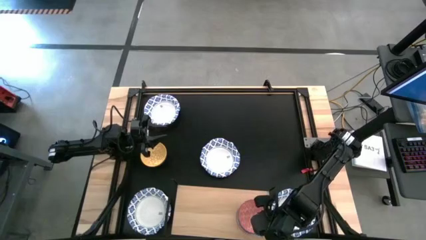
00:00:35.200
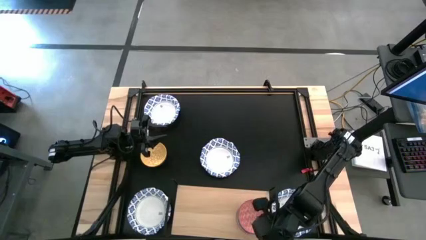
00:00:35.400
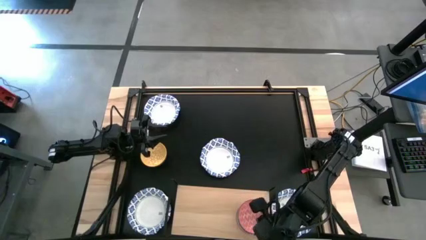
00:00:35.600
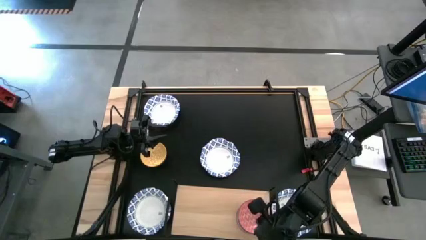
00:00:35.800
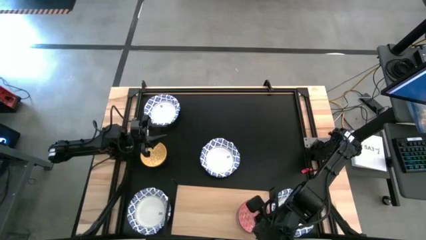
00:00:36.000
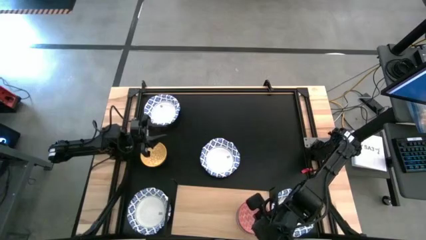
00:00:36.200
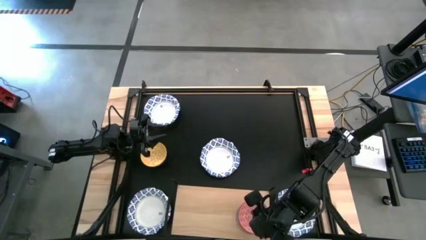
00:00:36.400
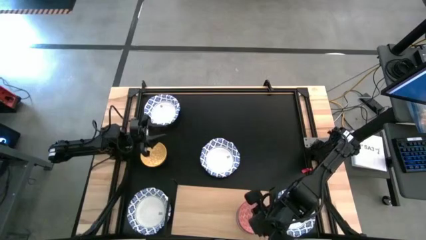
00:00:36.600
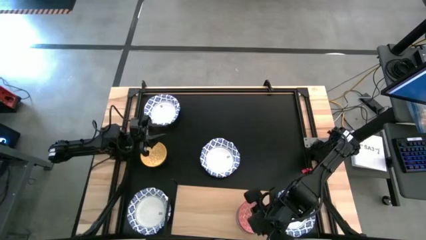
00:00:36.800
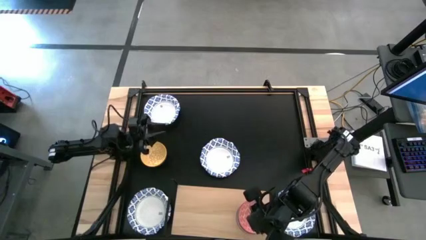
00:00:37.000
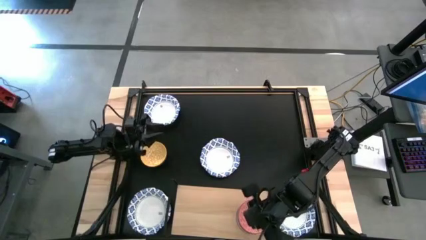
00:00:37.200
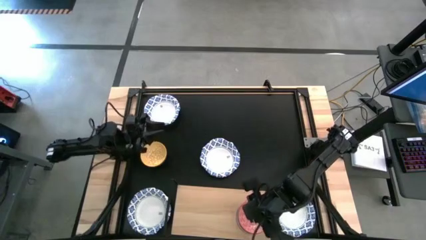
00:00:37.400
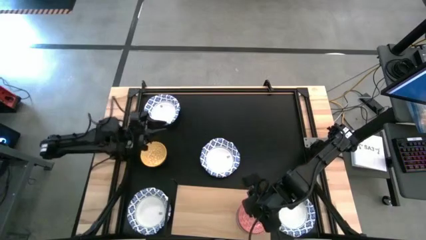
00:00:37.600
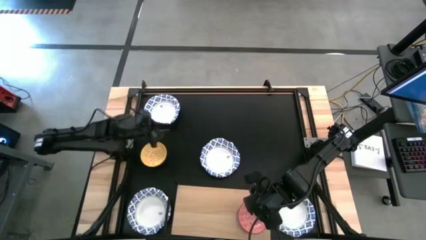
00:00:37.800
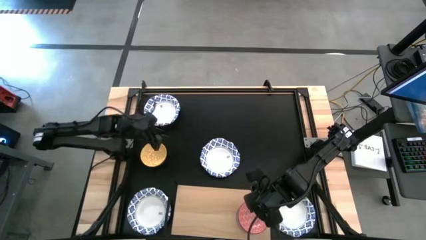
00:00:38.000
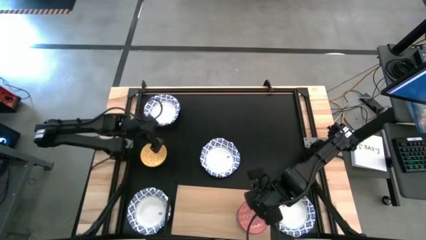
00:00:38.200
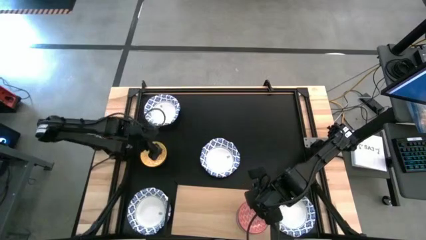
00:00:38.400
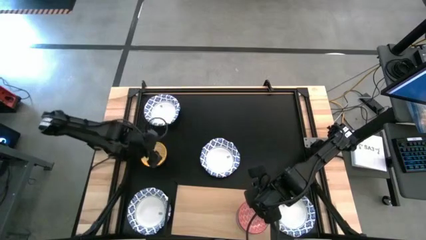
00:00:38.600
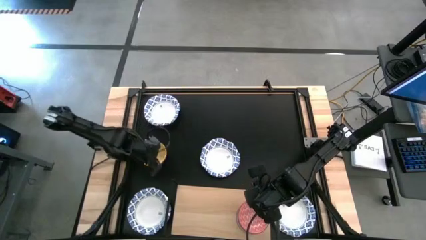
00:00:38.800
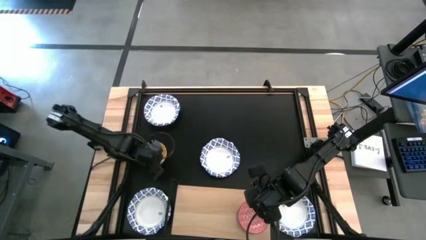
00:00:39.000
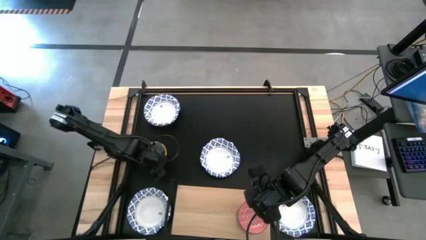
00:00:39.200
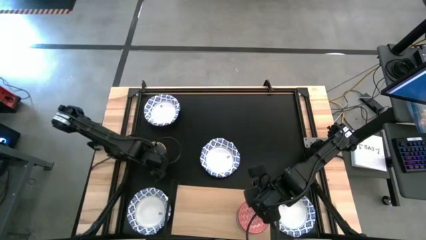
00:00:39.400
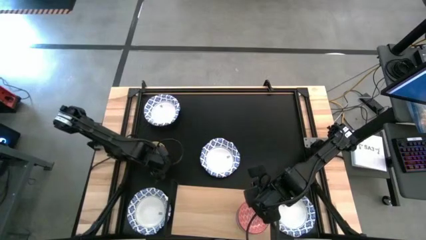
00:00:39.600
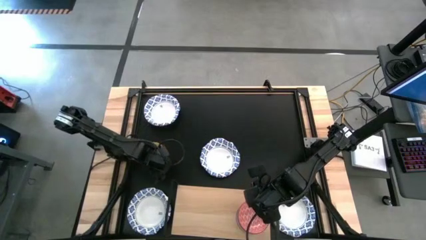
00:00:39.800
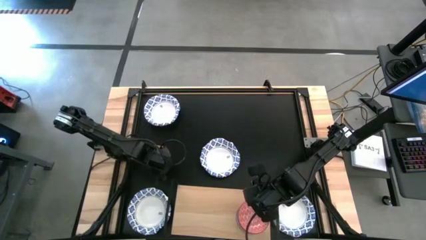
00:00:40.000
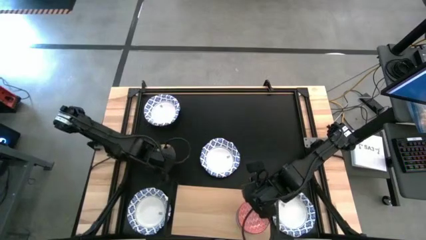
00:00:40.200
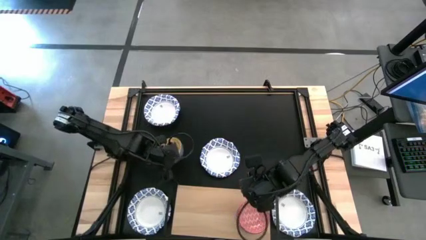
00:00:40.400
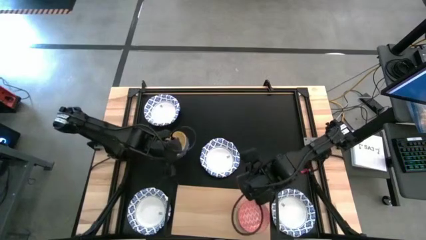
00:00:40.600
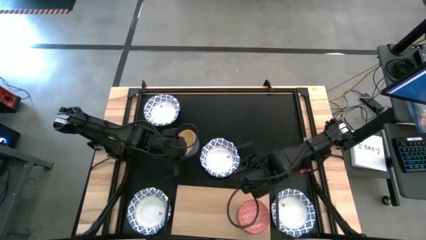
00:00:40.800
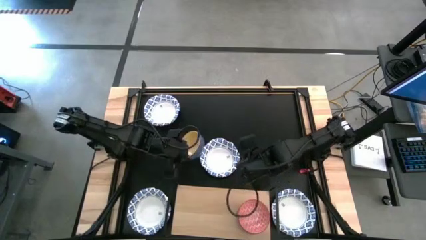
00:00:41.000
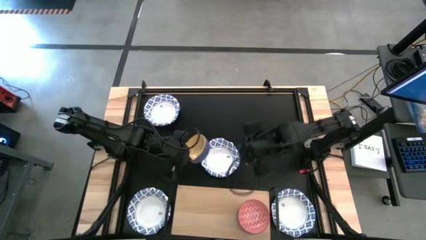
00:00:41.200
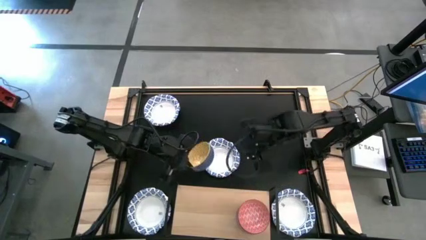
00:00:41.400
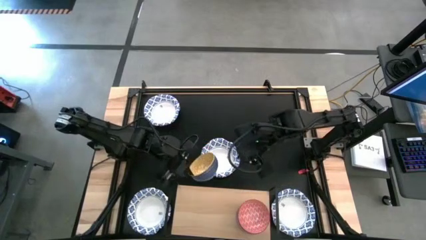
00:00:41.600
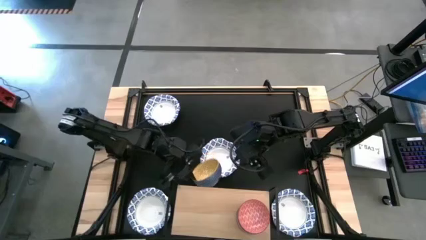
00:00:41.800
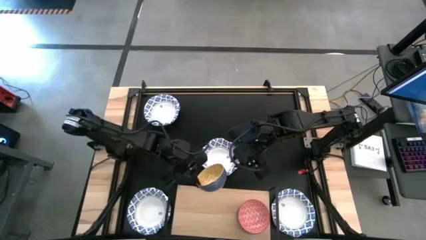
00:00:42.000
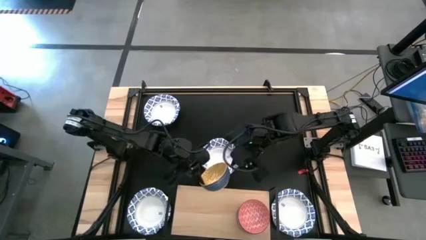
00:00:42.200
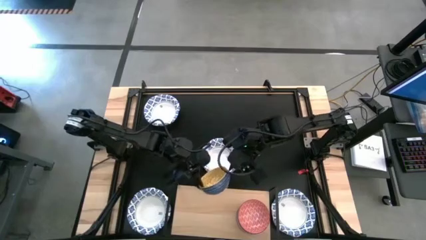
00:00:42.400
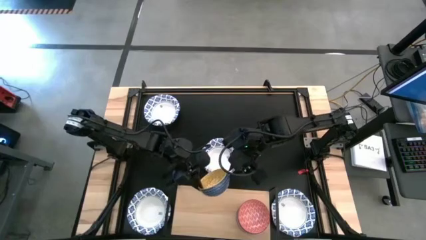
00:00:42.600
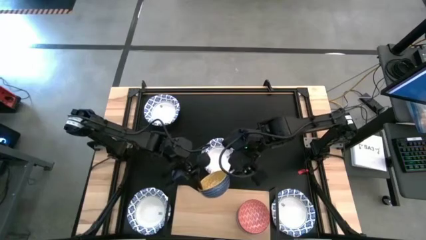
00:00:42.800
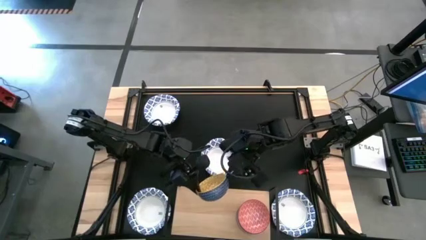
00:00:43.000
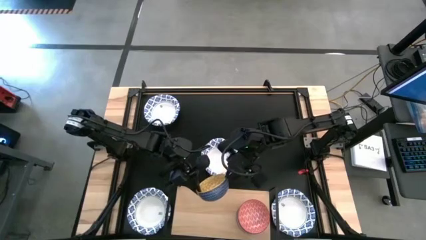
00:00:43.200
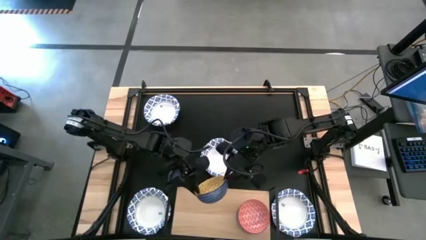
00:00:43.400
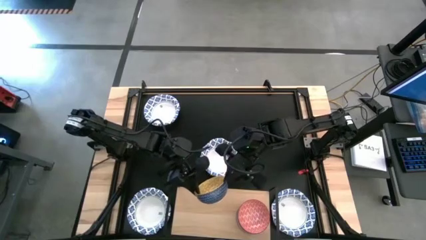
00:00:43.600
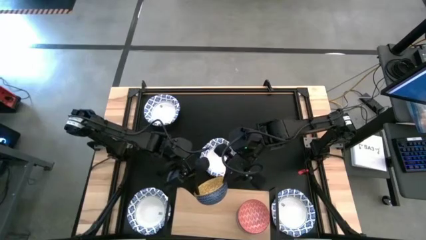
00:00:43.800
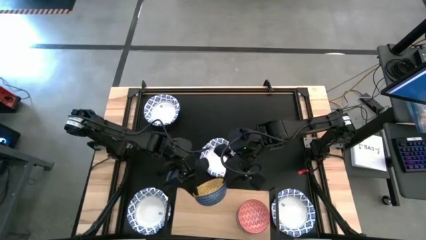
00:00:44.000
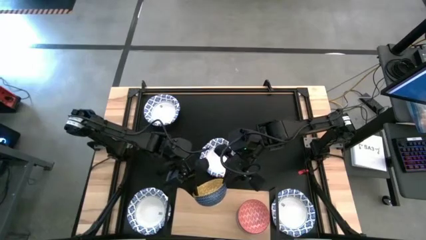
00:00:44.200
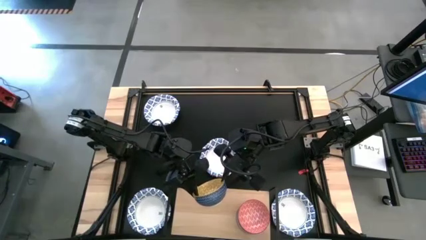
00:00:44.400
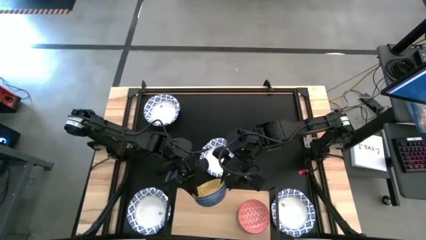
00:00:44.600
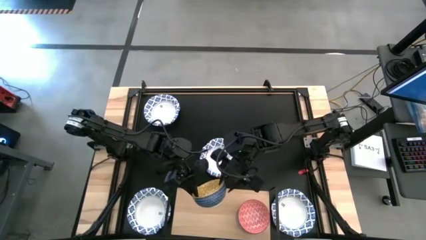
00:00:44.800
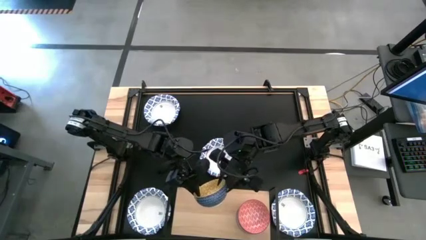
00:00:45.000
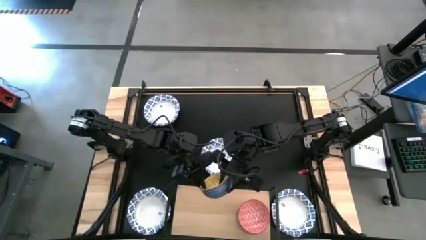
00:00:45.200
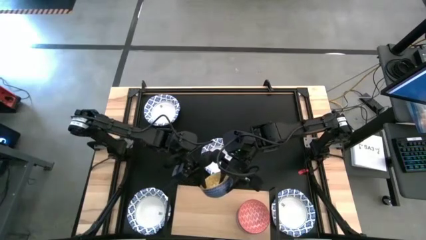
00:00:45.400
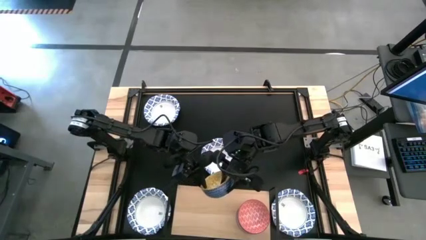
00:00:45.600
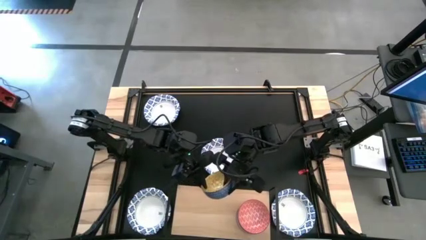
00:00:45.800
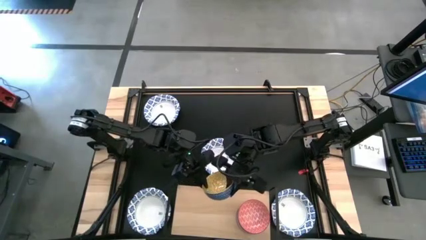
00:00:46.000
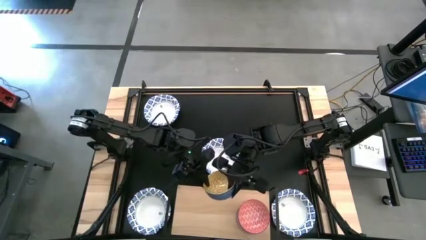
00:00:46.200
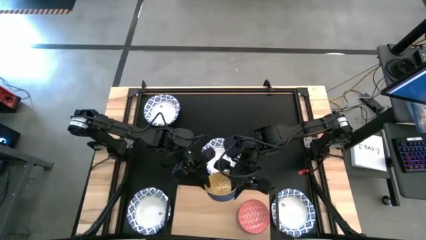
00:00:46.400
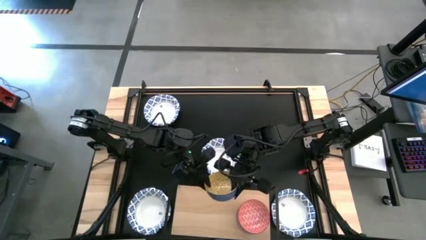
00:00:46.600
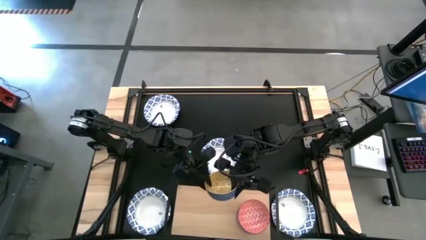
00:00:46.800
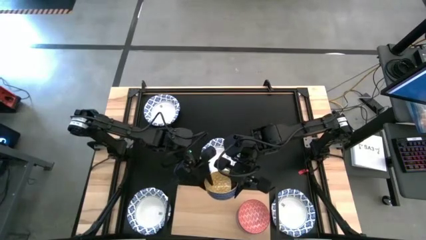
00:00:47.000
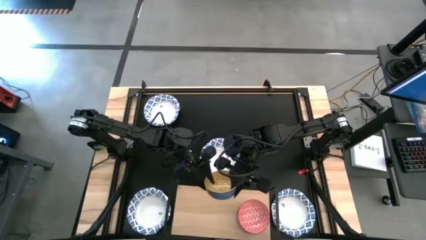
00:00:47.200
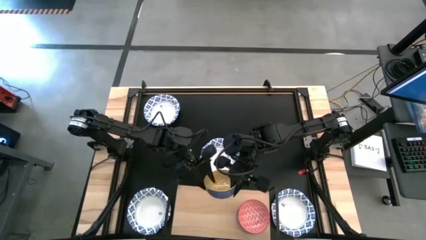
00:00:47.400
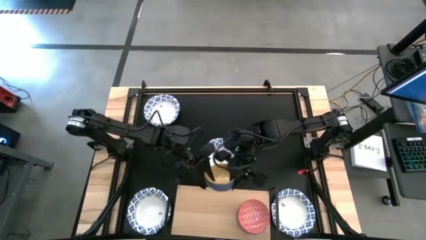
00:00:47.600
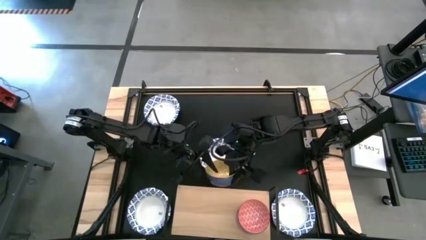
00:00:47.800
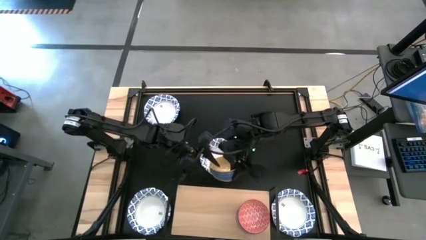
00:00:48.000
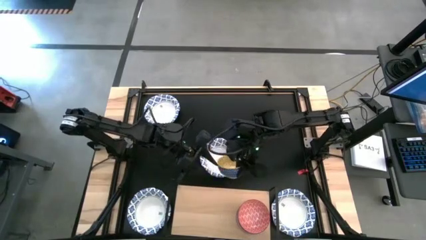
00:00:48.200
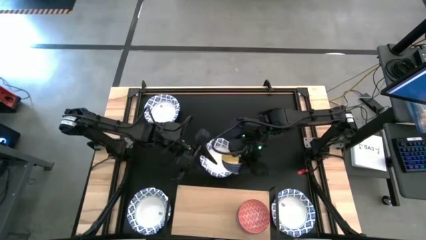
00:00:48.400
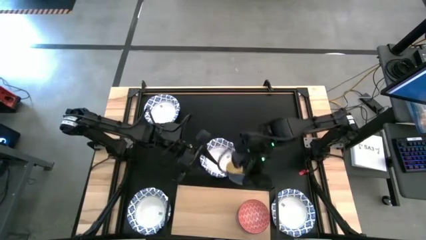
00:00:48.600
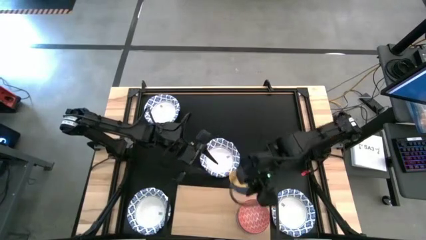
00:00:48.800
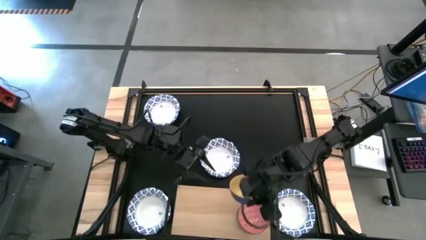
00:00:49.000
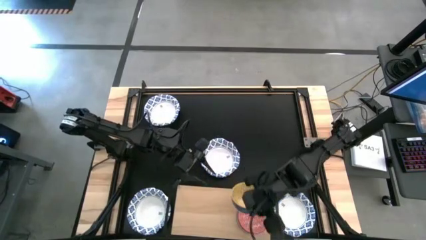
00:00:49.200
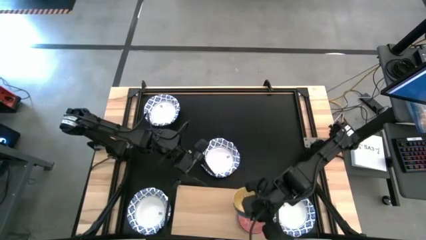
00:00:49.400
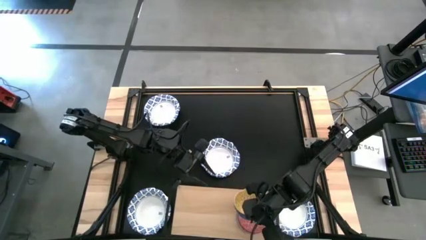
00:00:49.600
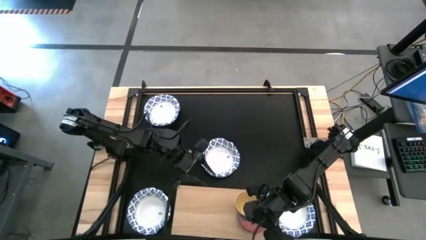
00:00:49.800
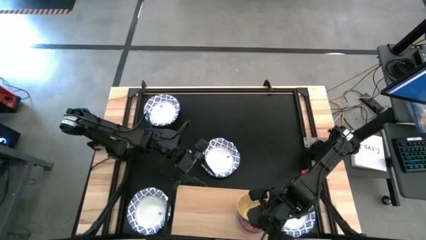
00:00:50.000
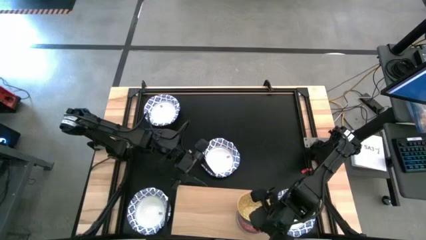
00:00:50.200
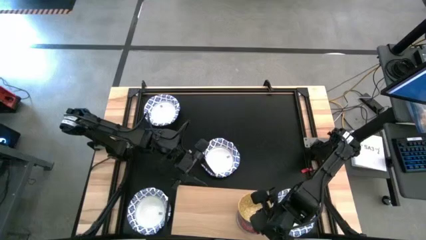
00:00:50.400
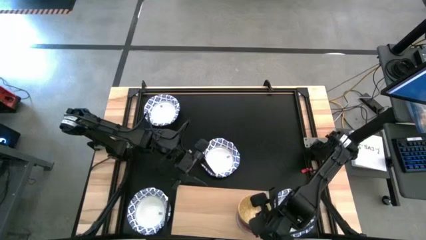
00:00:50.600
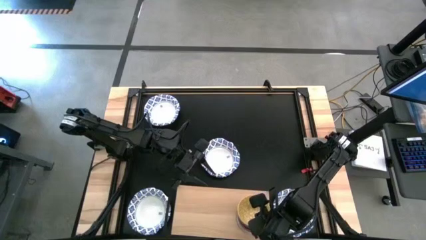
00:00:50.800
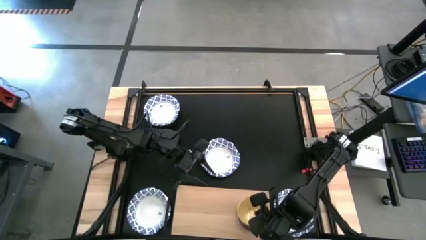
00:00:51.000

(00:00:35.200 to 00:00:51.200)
Task: Place and stack bowls onto a shelf
Stack the small yellow bowl on top of the small red bowl on the shelf

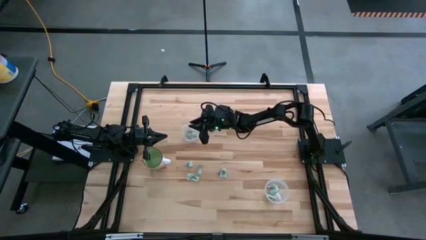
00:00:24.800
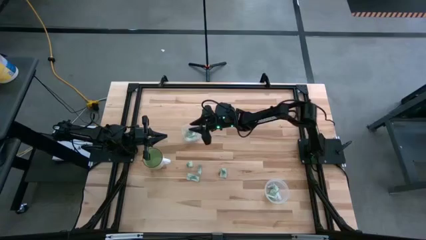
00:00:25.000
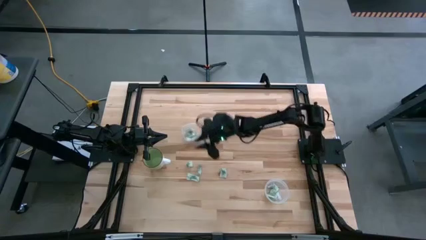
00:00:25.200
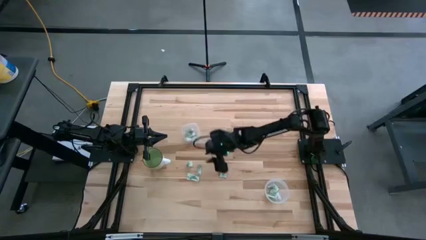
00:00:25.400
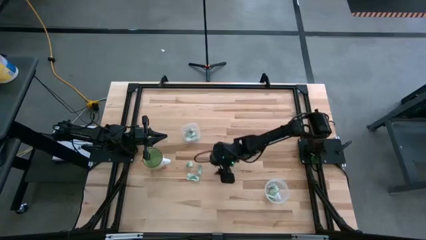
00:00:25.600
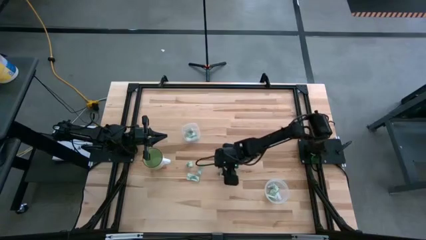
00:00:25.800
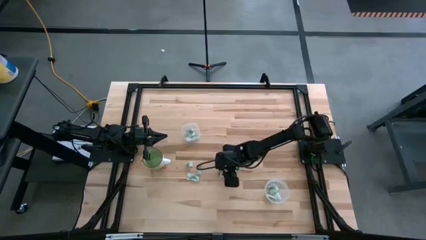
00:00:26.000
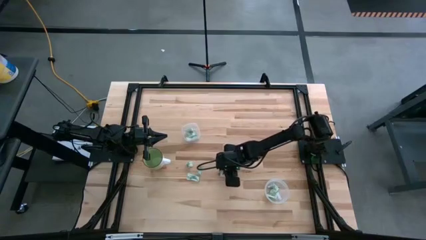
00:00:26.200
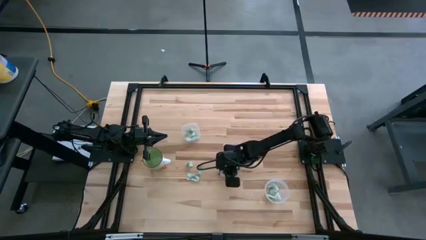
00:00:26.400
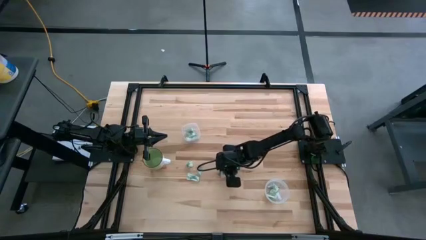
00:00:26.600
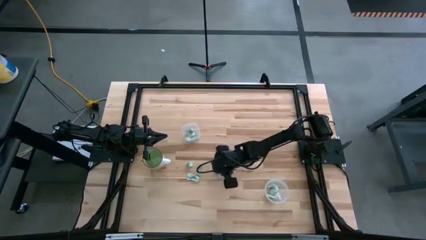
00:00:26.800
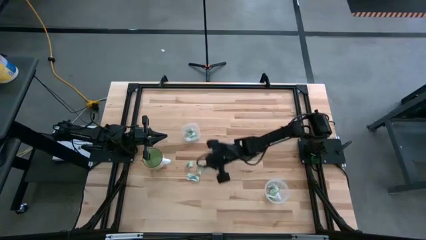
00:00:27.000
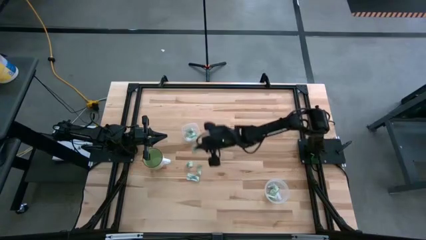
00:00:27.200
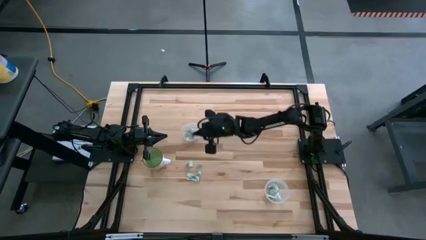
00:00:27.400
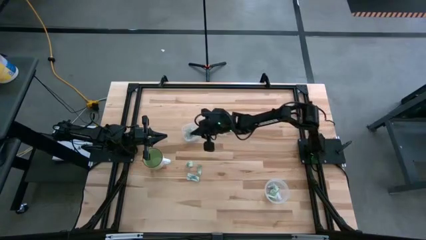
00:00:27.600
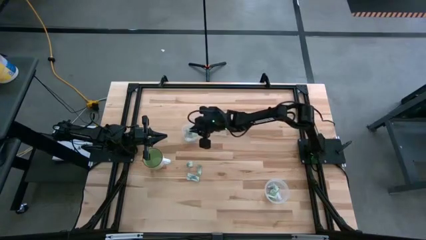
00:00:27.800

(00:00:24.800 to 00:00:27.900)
Task: Pick and place items into bin
Put the green stevia packet into the top transparent bin
